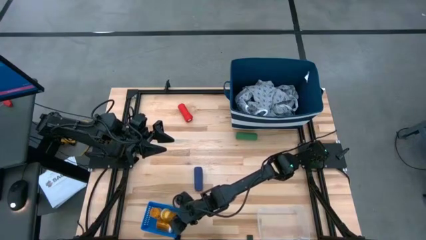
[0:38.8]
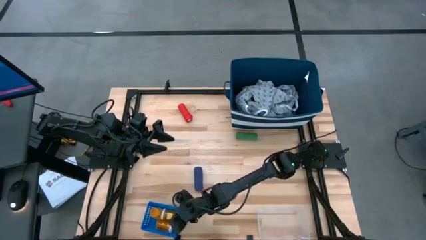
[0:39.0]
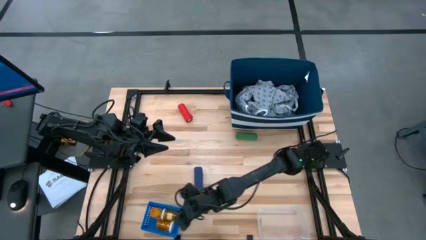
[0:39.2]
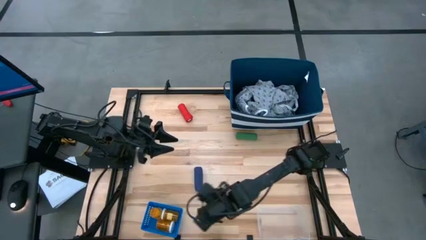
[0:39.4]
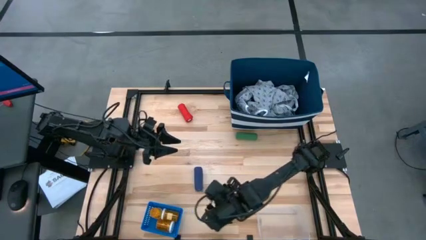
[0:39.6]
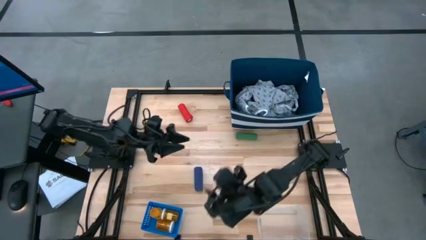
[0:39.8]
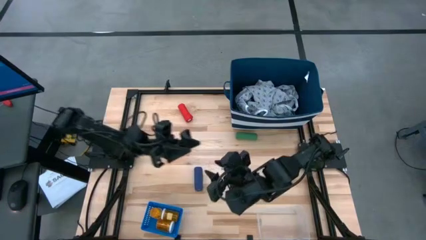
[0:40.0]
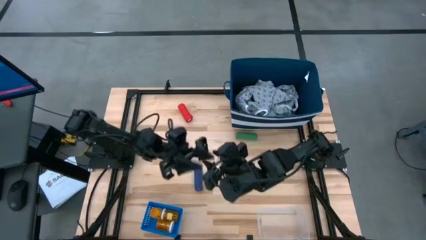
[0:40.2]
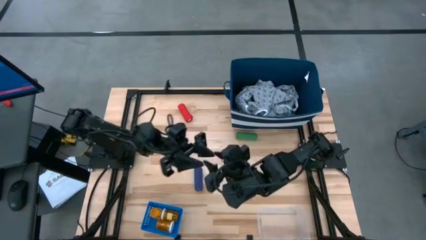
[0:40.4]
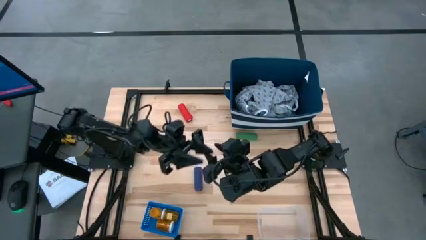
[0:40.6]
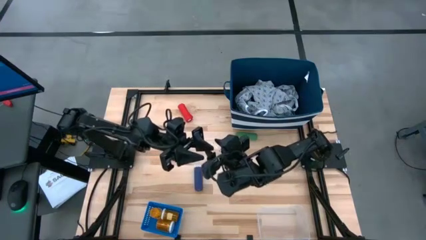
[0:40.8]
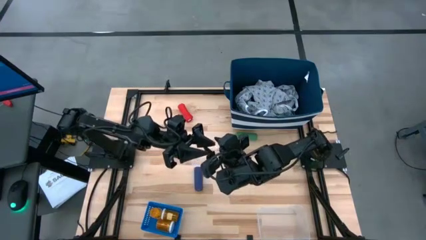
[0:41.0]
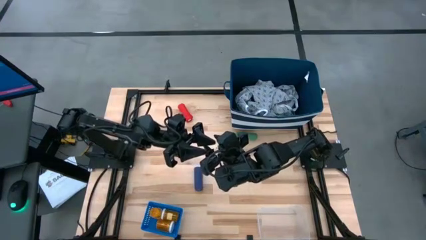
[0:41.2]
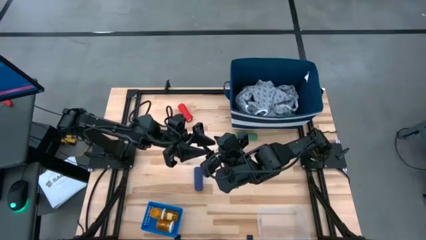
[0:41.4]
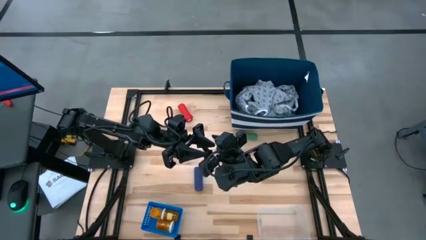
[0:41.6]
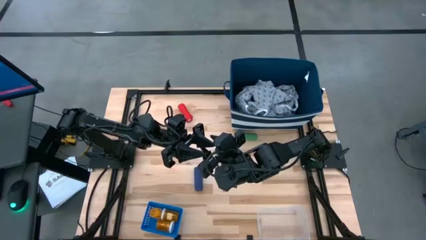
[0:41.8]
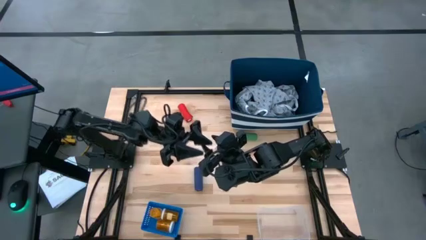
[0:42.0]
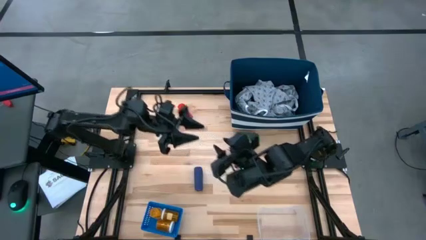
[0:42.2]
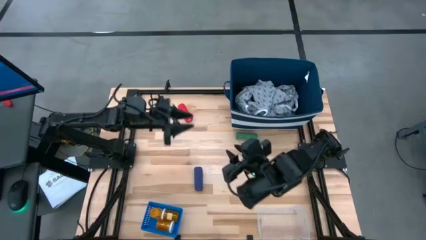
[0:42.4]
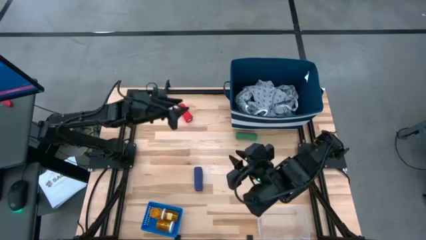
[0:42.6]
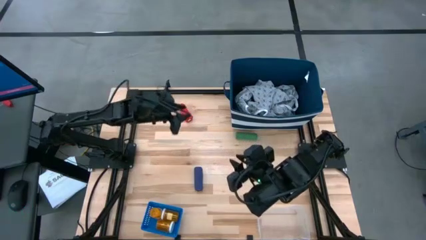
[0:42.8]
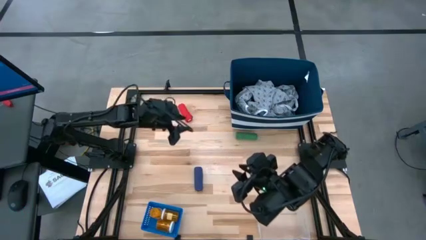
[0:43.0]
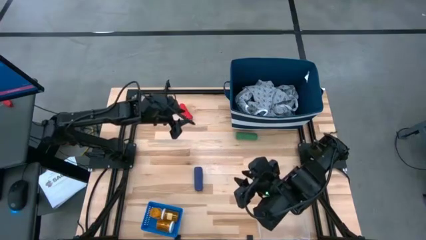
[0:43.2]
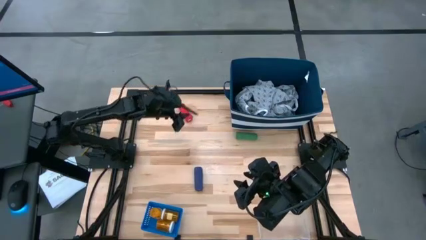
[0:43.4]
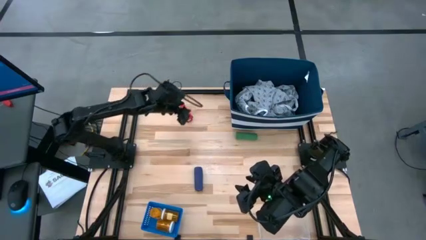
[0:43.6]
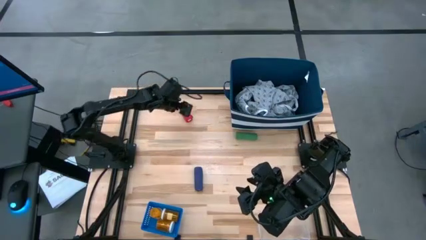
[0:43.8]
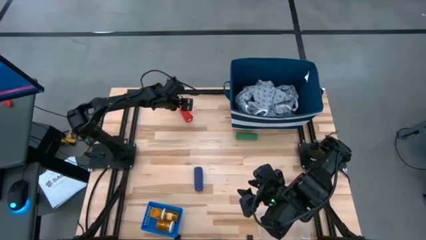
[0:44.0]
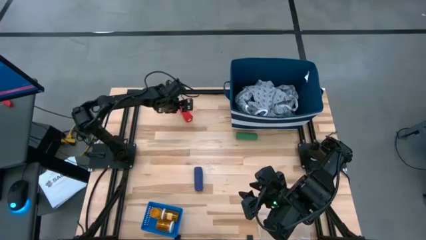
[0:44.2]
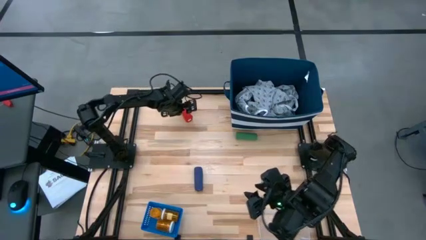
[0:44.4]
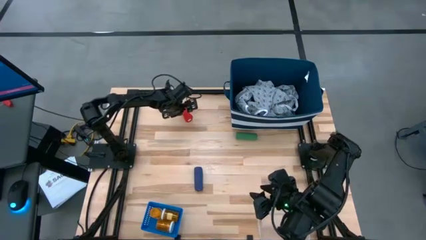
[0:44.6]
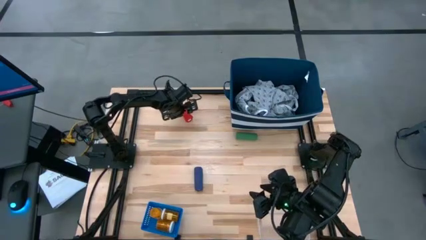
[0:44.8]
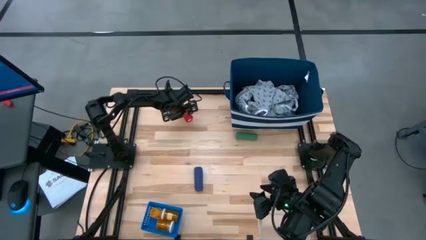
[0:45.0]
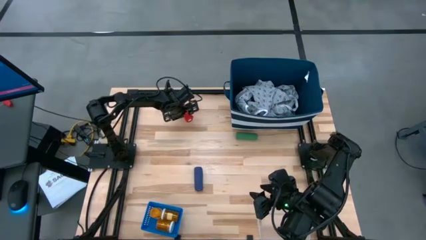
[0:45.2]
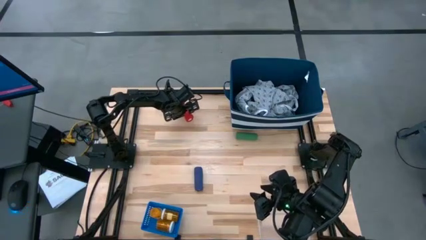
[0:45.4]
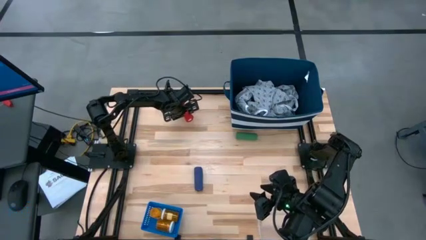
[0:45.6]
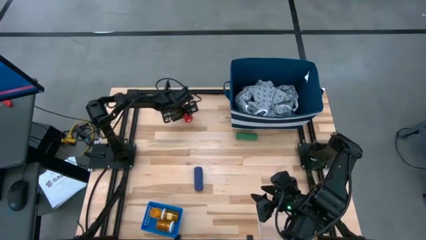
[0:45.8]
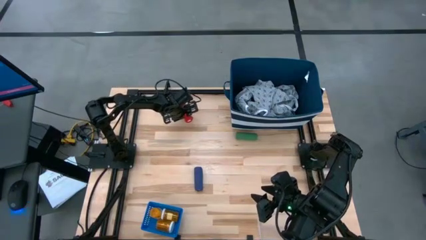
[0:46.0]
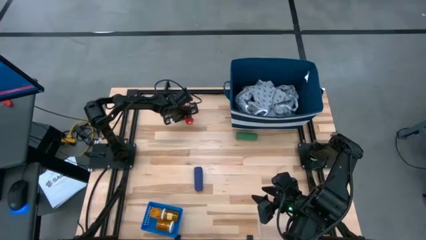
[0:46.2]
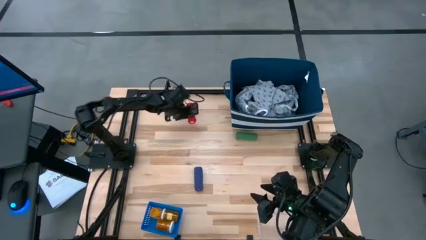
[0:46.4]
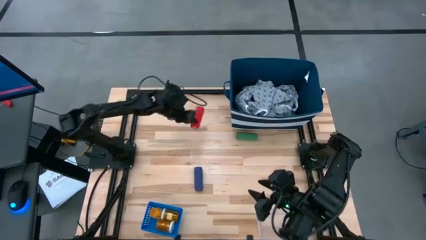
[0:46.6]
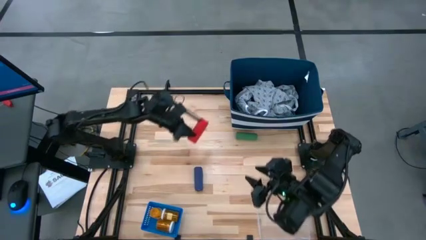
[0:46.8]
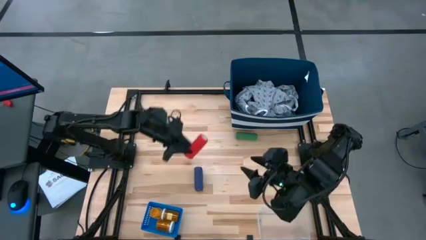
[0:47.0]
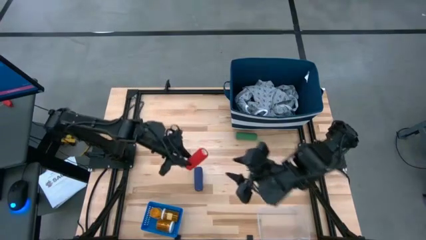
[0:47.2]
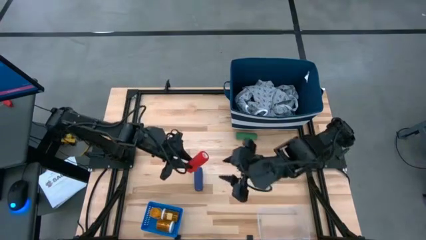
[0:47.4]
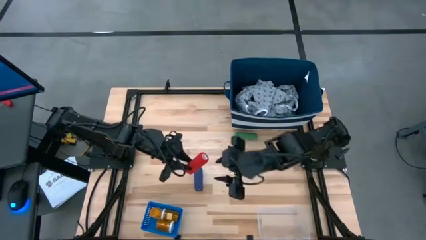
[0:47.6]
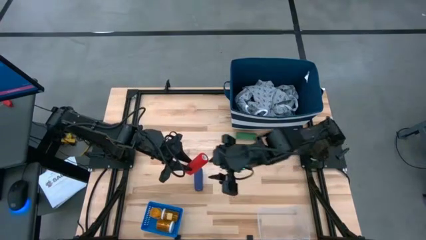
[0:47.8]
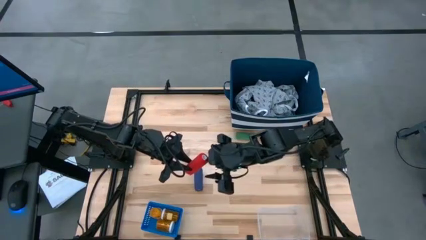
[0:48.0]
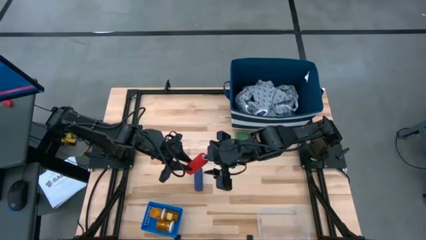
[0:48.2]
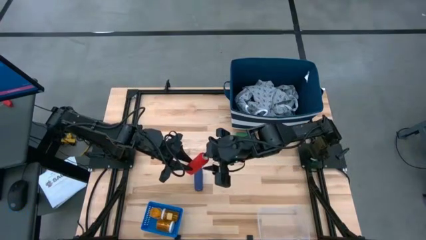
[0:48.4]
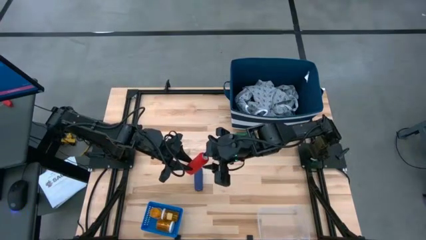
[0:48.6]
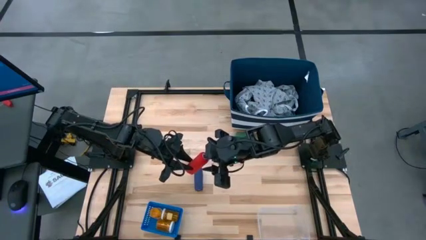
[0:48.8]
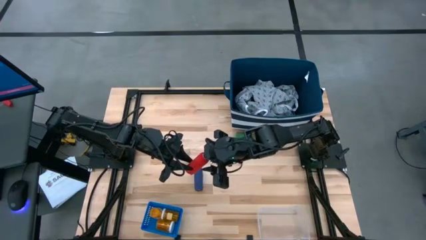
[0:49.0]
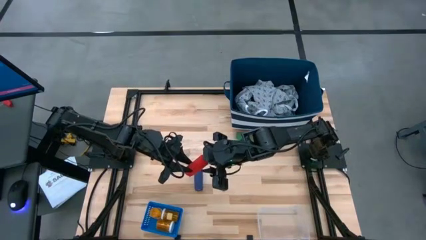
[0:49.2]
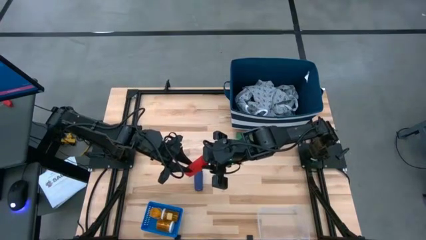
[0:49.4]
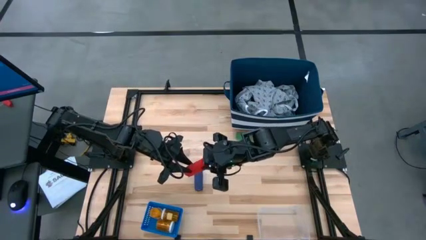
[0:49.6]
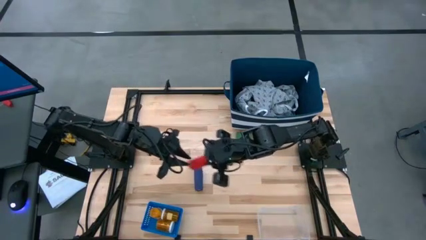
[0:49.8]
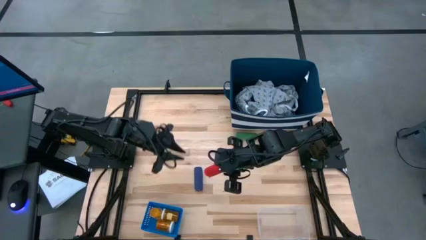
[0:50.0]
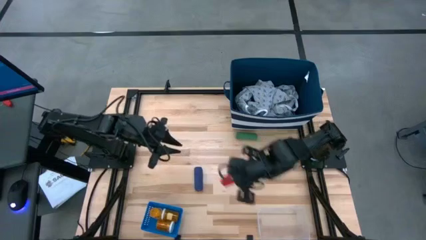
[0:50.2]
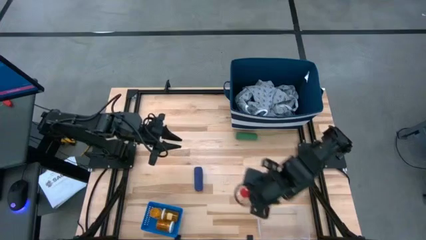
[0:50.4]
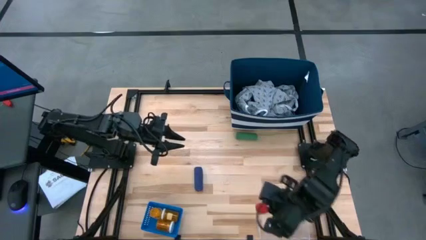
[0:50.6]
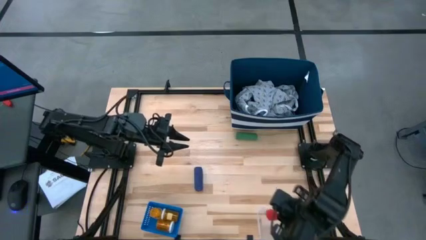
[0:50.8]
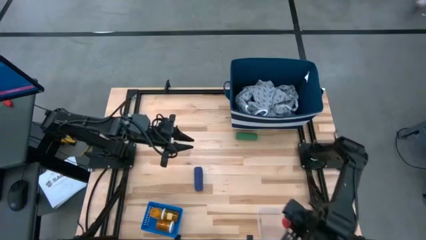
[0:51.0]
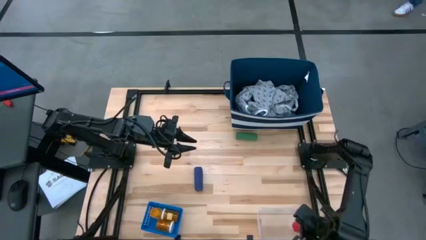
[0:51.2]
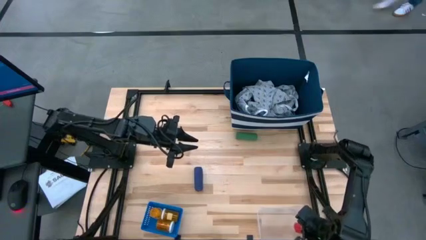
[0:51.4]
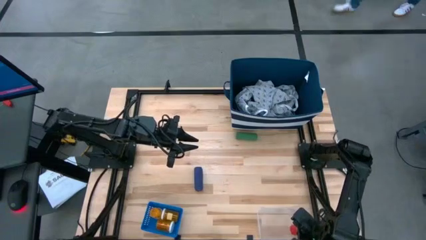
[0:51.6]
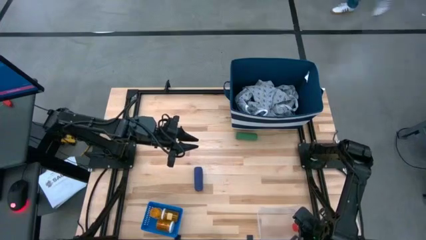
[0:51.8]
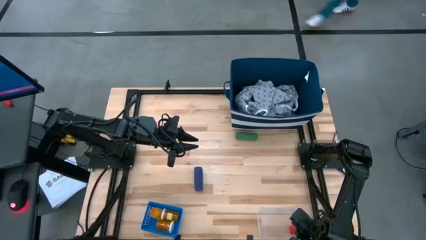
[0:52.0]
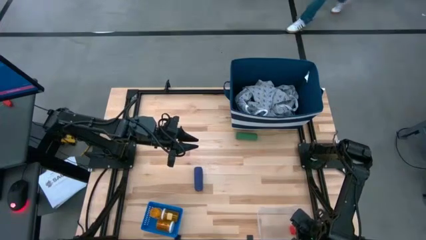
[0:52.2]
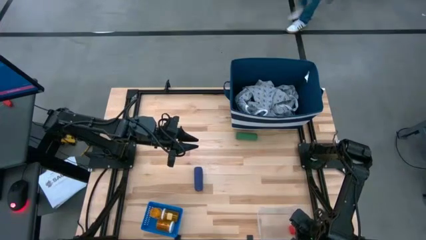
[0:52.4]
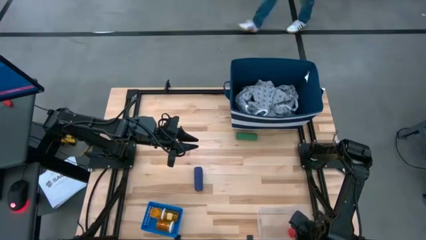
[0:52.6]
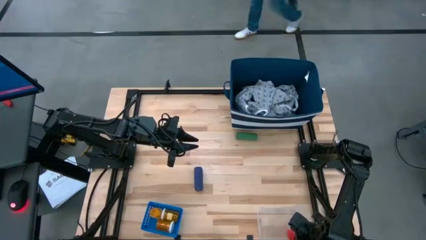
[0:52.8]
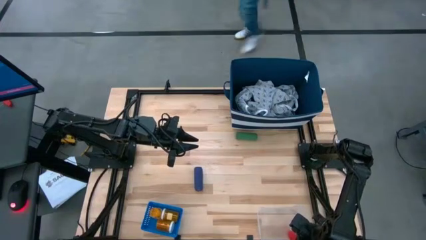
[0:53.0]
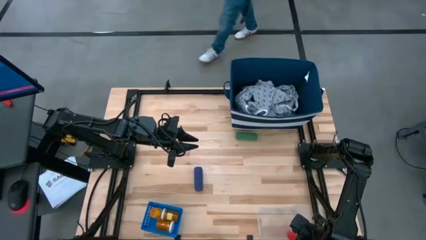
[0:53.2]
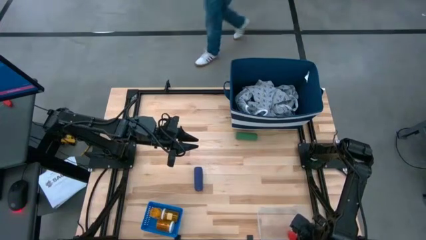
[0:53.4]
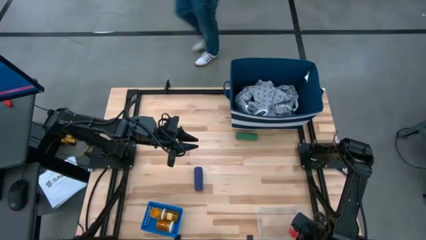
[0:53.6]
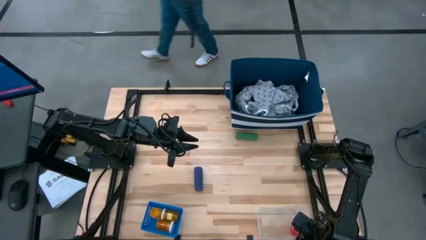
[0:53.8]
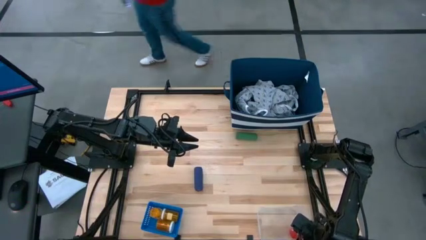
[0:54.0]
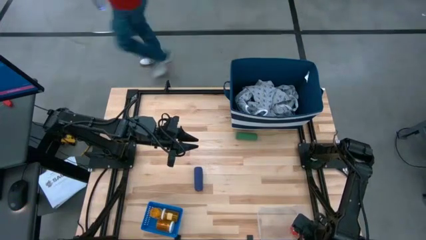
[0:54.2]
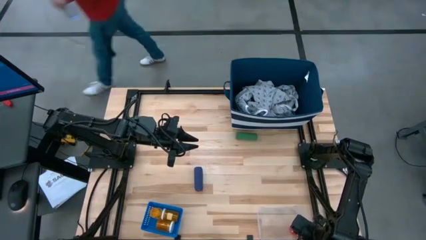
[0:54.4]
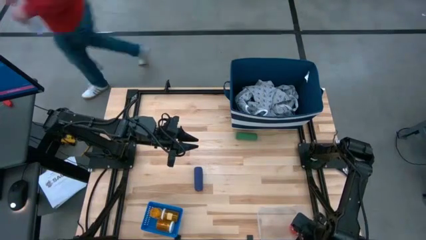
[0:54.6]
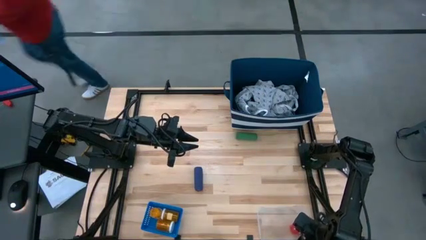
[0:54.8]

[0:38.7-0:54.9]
Task: Pick & place medical supplies in basket/bin
Put the red bandage into the transparent bin
